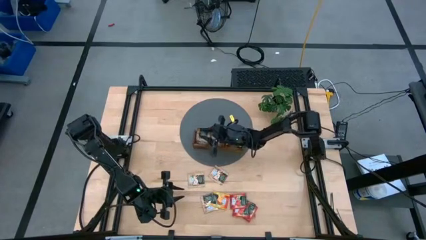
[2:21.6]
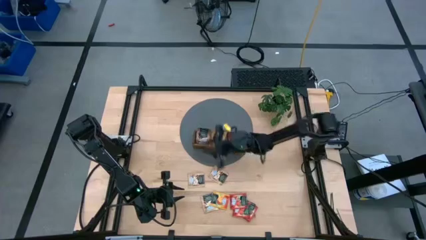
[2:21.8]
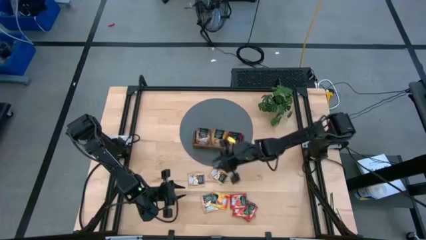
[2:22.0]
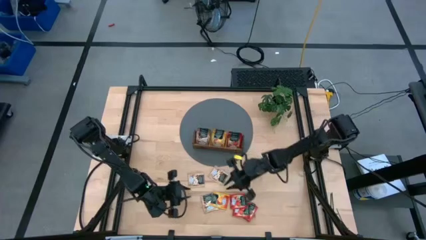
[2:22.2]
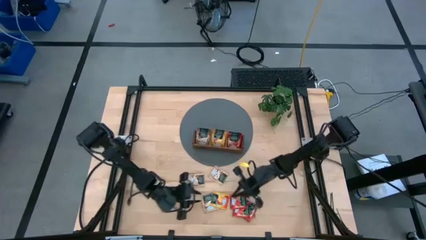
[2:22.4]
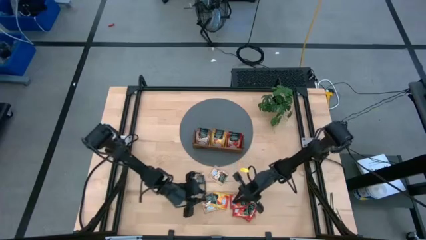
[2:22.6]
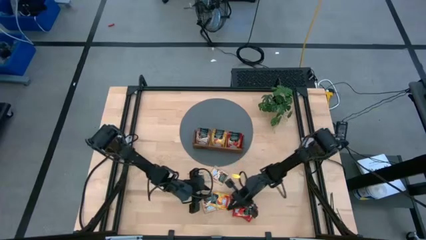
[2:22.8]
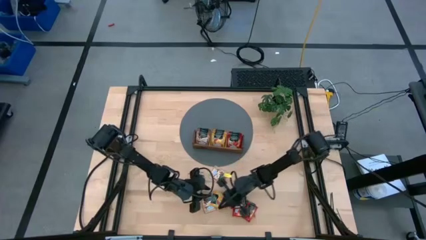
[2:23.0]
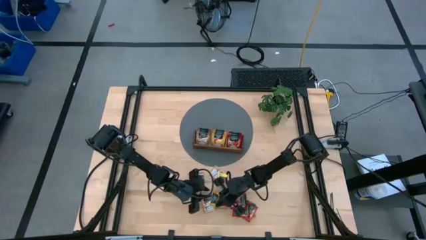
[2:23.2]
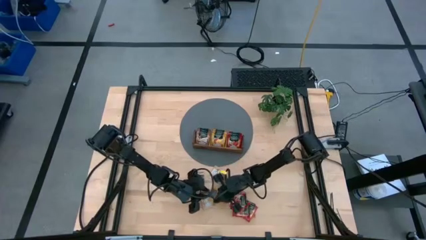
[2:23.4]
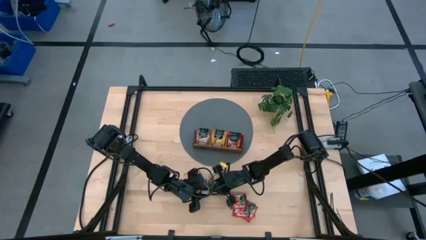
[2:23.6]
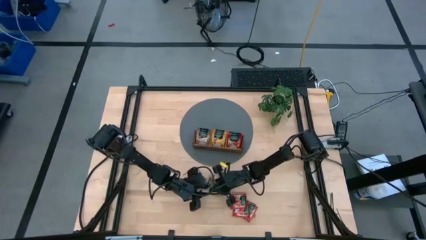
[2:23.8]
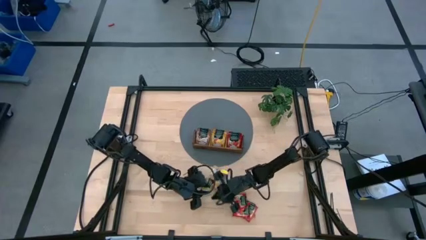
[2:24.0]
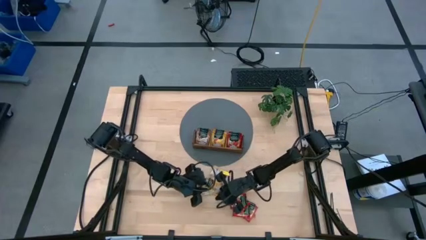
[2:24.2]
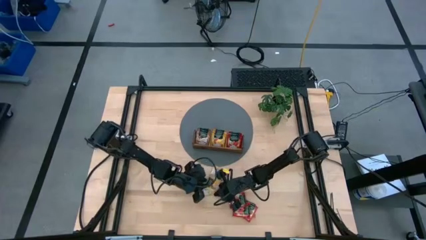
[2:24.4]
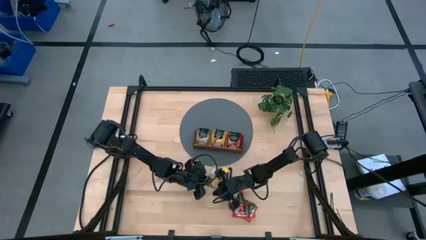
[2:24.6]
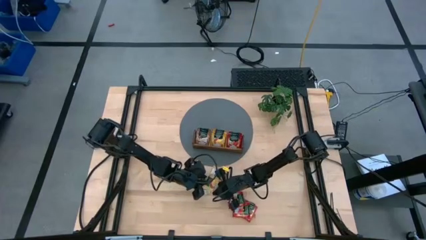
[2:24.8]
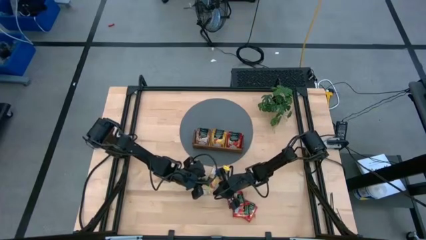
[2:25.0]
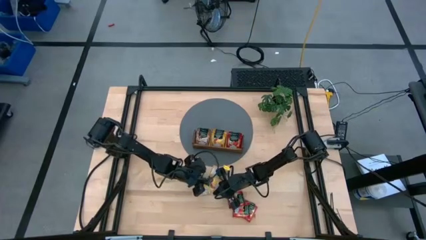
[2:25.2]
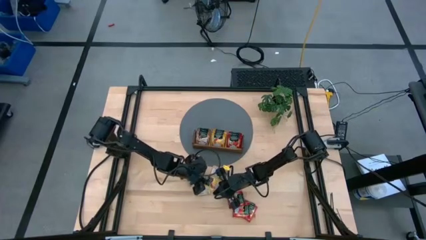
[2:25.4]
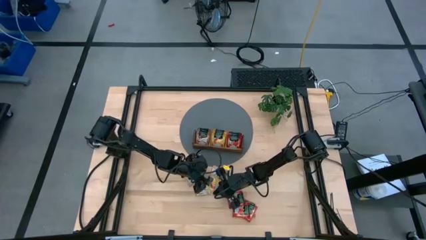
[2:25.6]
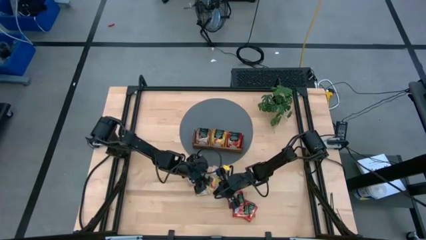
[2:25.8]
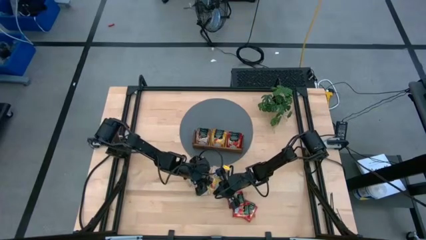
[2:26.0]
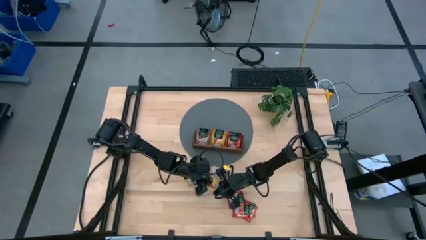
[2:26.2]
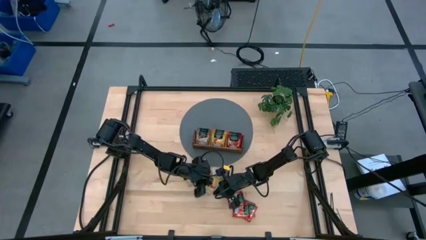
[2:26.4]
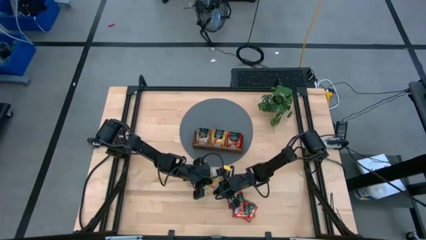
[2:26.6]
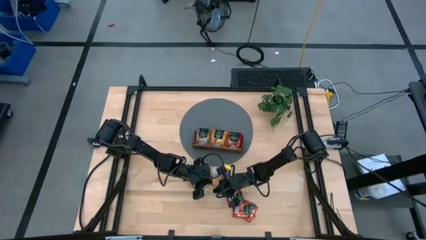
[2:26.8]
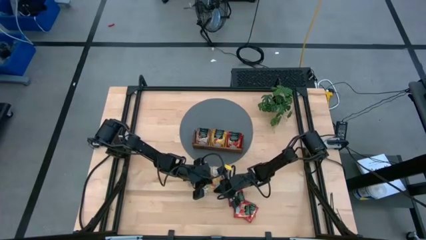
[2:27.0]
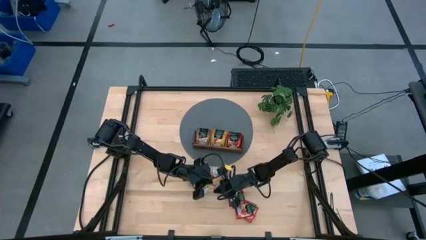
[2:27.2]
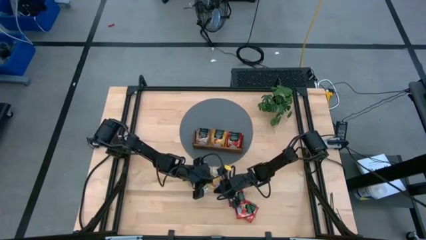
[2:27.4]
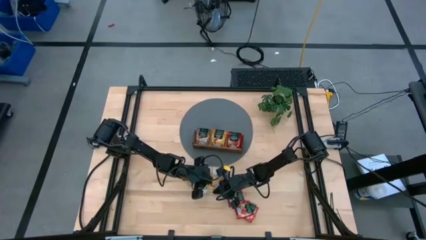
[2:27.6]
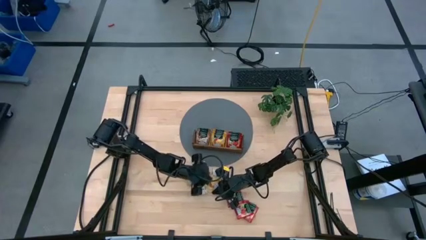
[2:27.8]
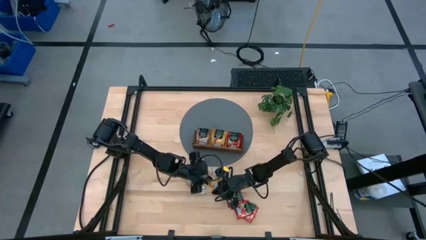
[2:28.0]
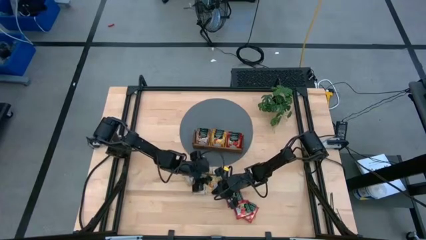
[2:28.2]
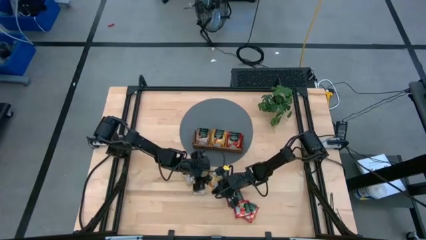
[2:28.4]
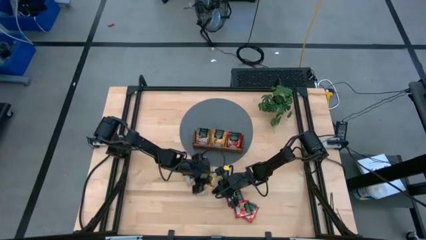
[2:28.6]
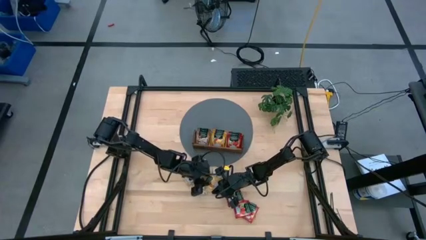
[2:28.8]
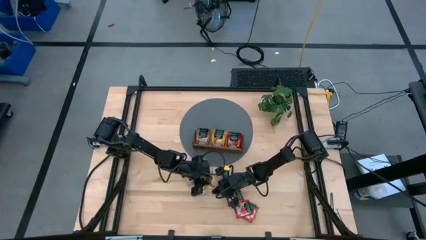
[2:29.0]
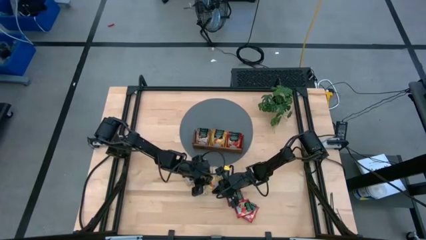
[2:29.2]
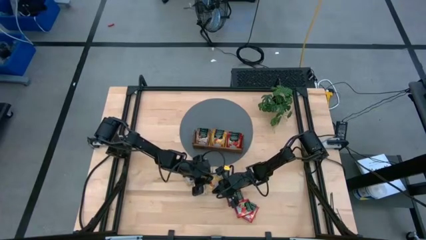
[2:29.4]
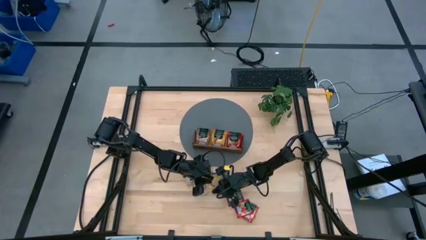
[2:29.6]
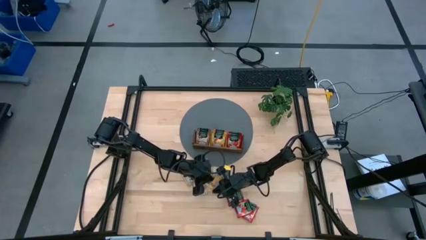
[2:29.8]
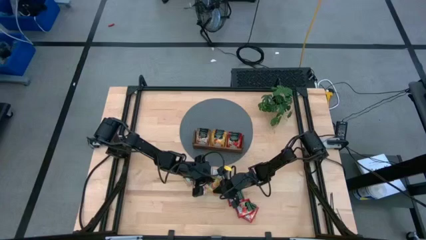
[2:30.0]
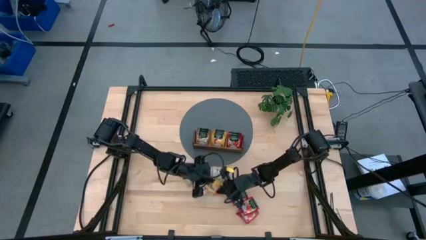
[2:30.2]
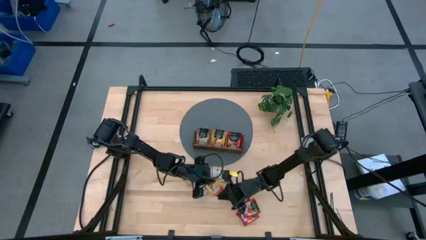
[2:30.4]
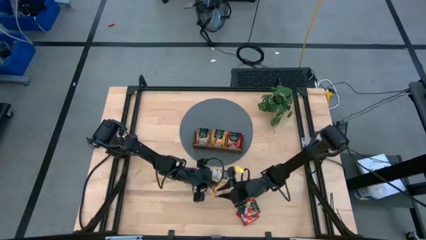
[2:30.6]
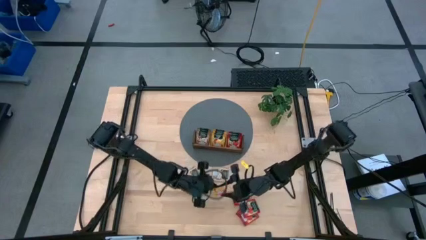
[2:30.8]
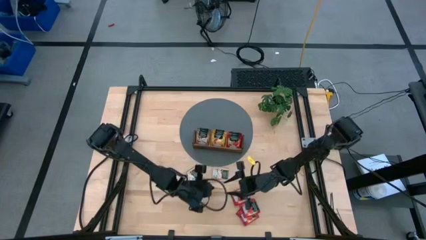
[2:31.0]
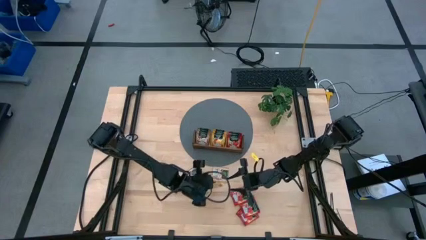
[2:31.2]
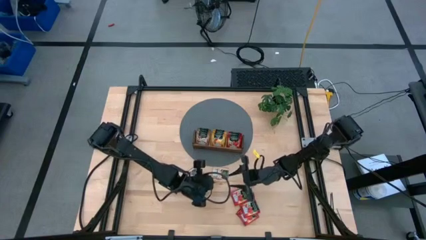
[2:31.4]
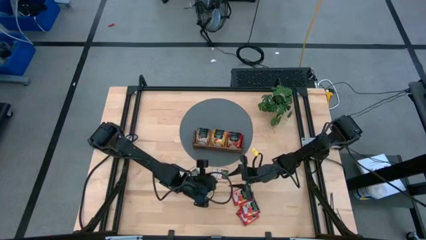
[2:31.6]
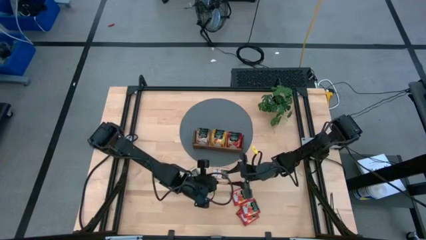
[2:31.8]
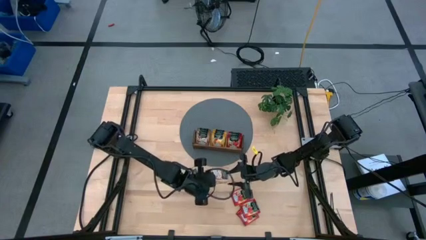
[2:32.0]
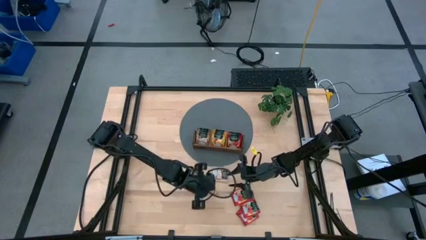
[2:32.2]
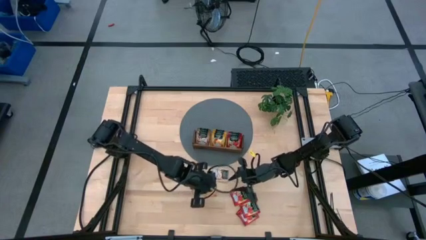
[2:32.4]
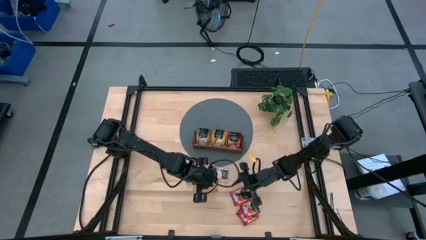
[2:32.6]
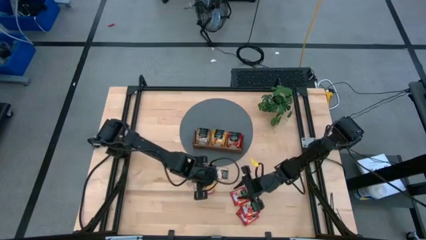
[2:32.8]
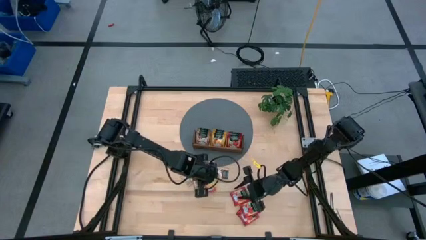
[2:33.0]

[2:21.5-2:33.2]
Task: Pick & Place Tea
Put the yellow tea bag into the middle section of the wooden organizer

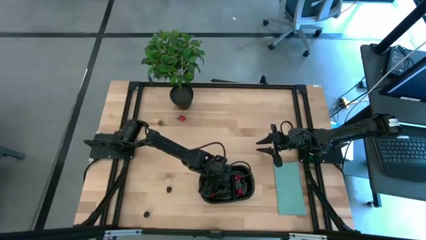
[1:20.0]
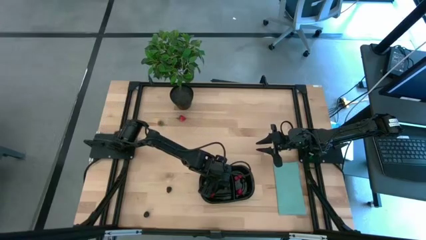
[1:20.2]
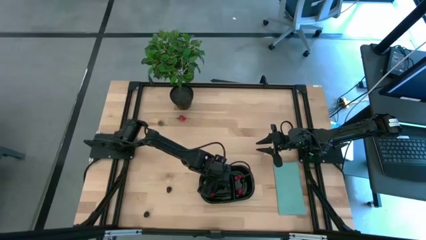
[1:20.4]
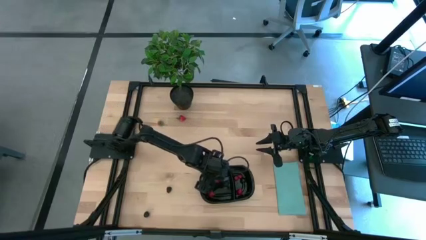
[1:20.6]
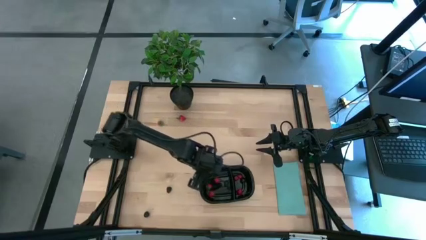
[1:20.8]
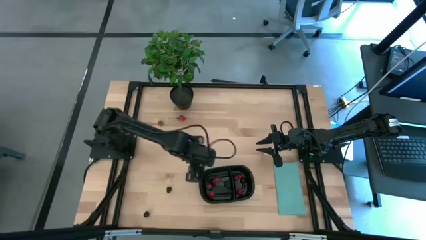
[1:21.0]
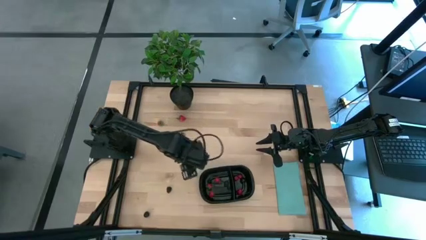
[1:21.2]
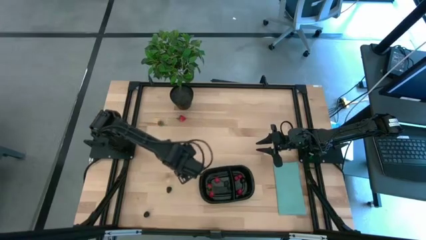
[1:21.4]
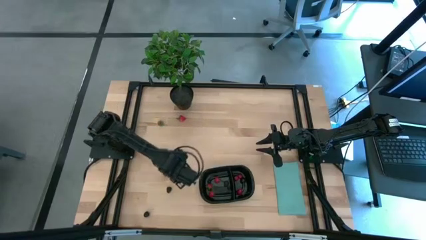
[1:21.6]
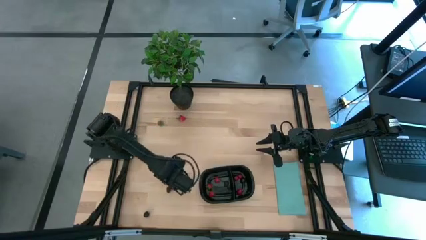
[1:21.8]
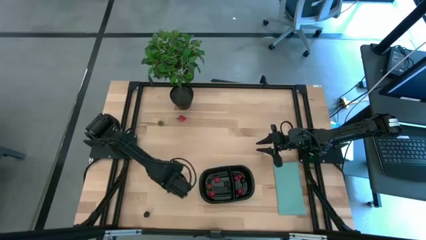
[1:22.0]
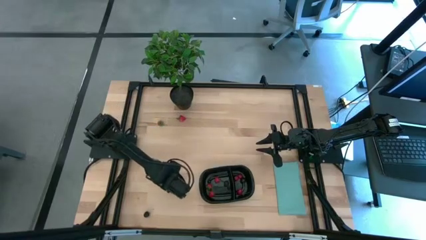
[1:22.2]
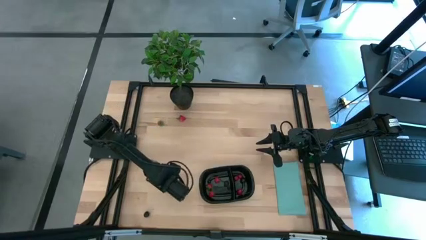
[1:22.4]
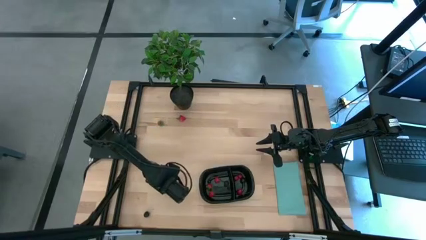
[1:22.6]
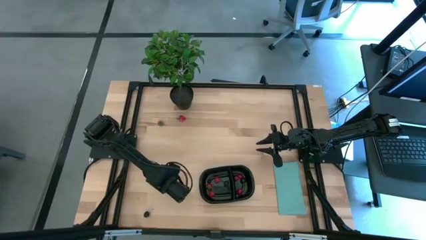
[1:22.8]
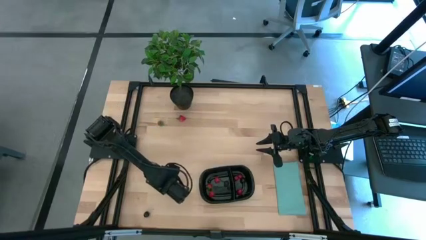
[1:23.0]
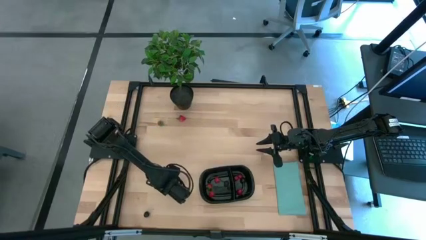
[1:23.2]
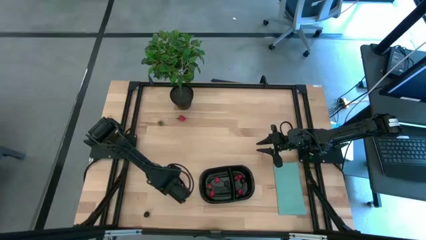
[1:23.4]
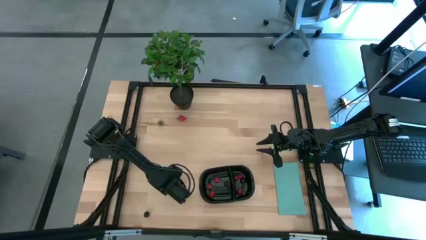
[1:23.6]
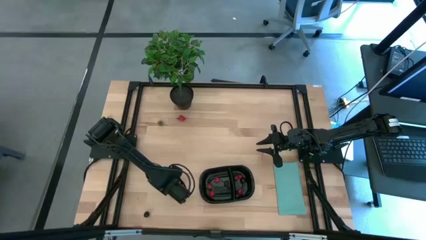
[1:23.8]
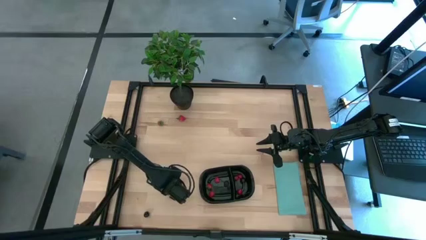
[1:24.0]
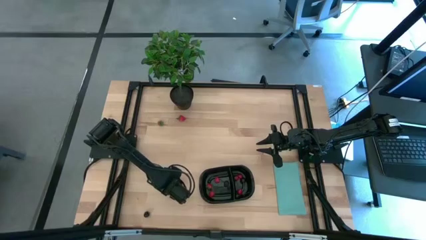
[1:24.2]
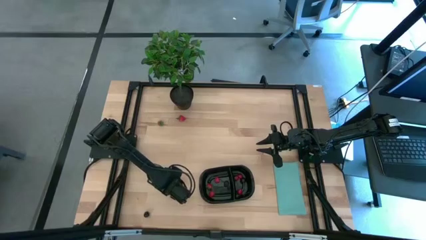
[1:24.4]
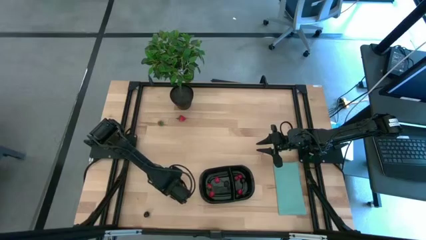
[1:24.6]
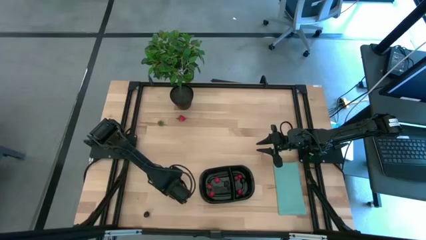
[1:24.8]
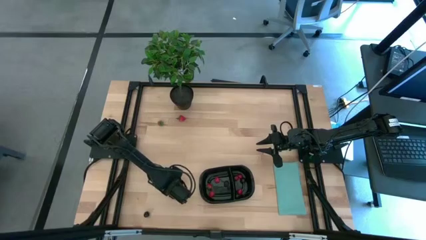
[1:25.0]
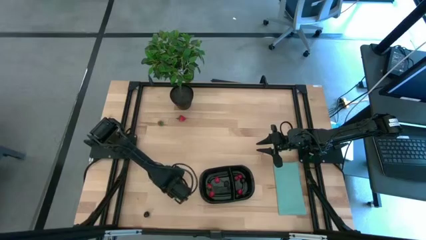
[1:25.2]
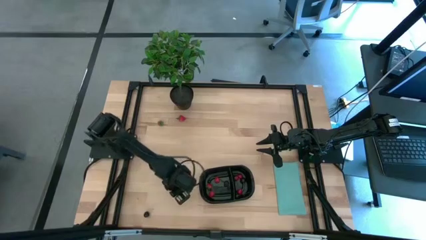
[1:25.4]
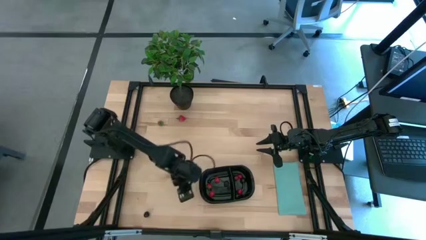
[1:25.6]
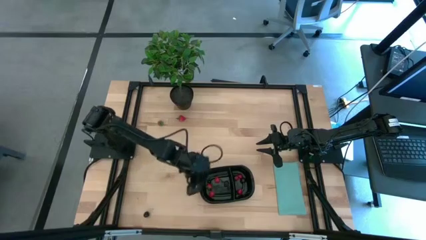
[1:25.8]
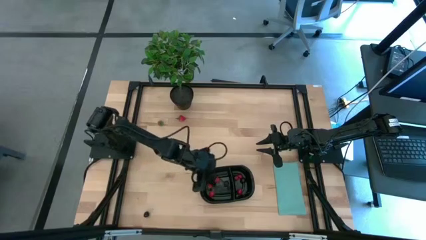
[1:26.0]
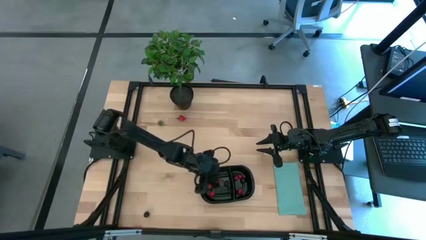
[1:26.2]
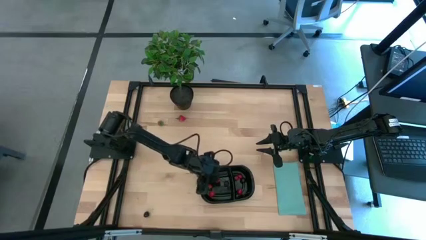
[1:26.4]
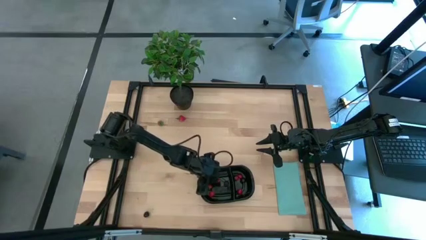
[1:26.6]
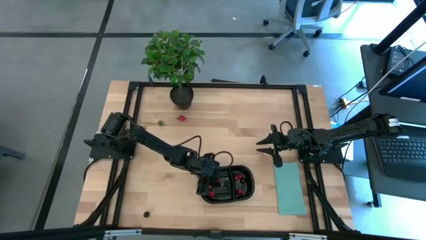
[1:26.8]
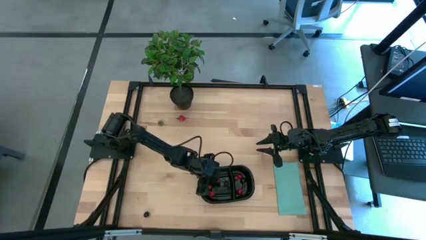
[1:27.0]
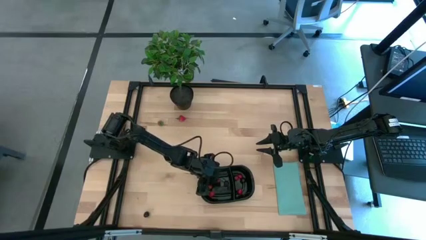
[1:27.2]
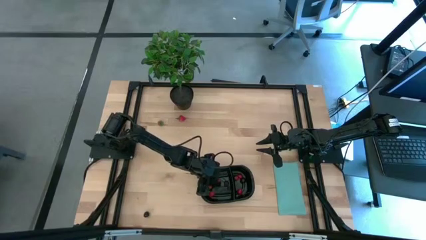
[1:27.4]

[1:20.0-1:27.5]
Task: Pick and placing Produce into tupperware
Put the blackberry into the left side of the black container
